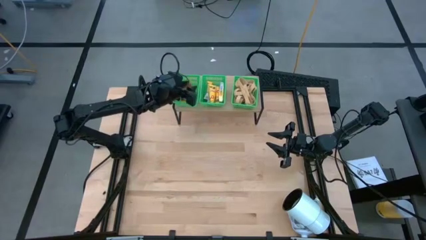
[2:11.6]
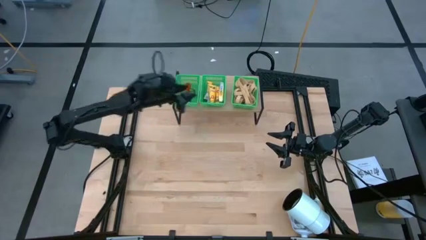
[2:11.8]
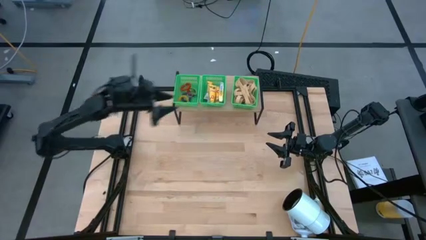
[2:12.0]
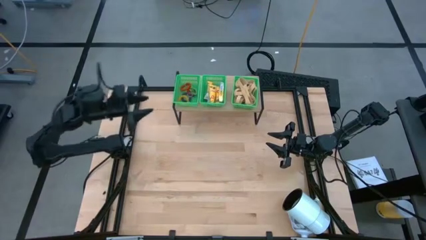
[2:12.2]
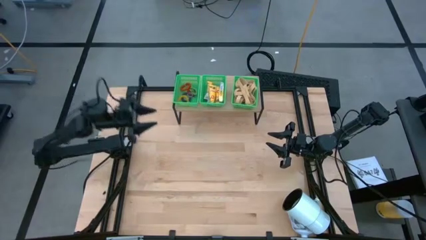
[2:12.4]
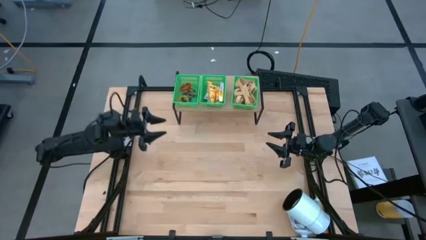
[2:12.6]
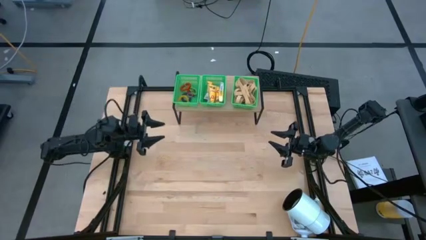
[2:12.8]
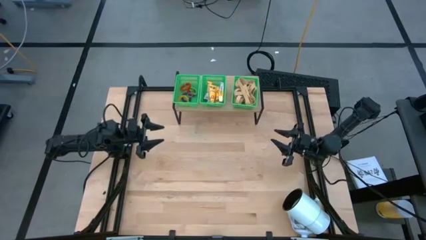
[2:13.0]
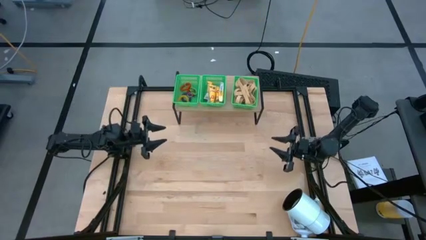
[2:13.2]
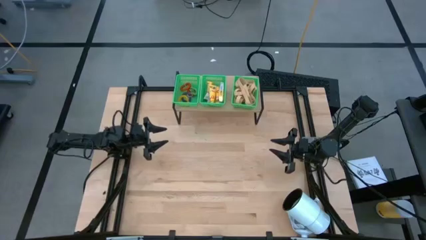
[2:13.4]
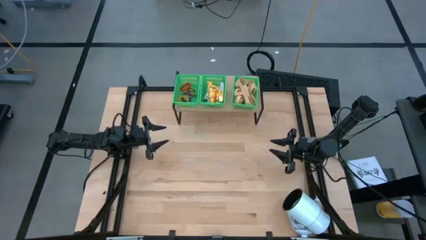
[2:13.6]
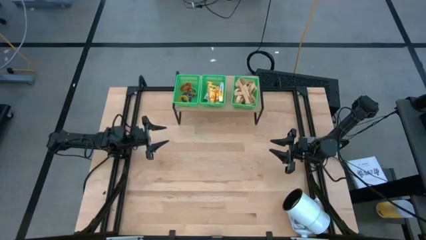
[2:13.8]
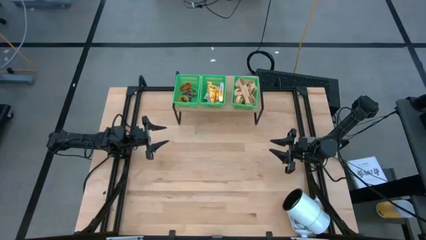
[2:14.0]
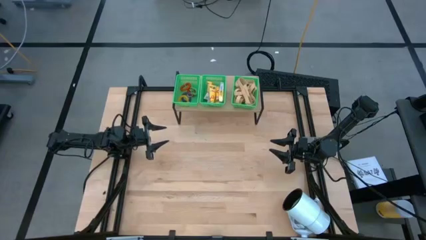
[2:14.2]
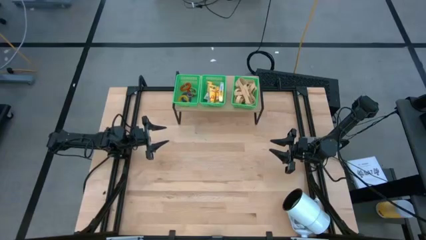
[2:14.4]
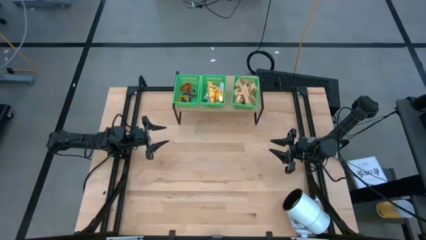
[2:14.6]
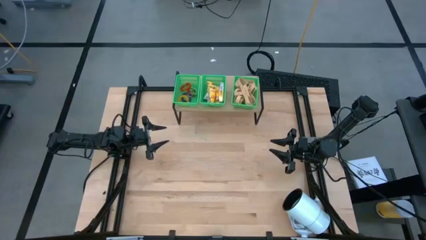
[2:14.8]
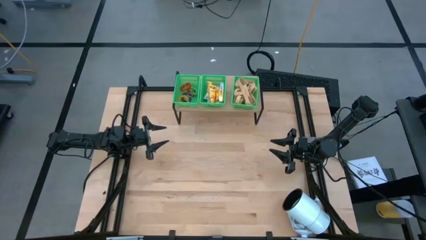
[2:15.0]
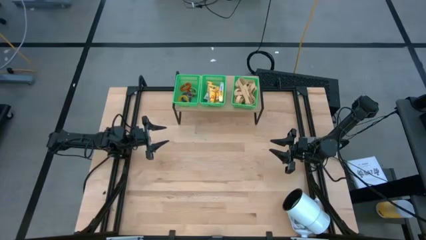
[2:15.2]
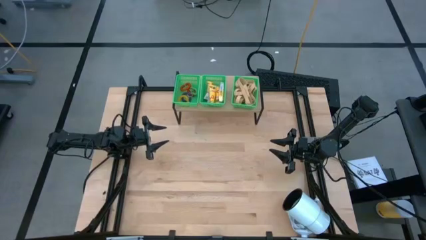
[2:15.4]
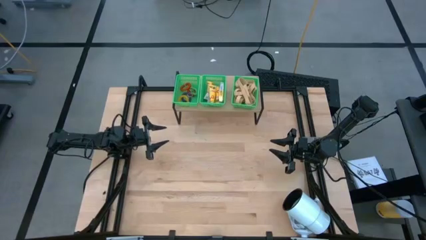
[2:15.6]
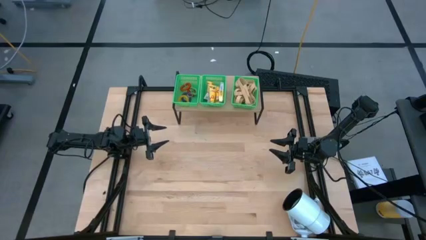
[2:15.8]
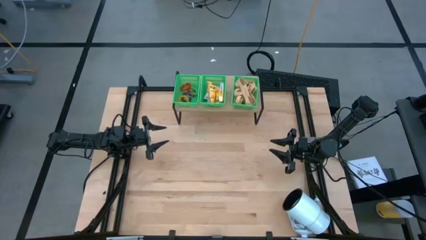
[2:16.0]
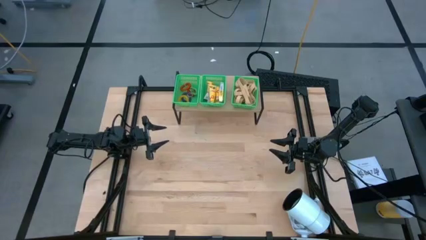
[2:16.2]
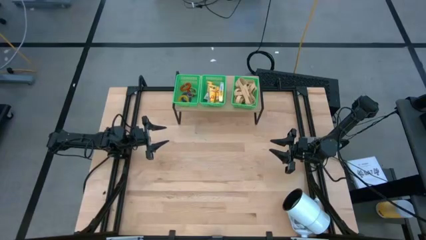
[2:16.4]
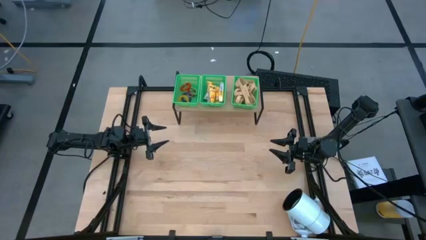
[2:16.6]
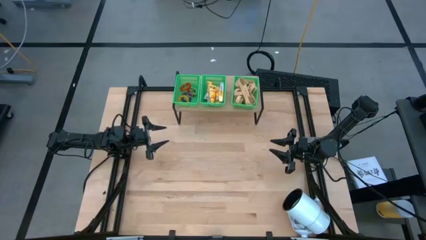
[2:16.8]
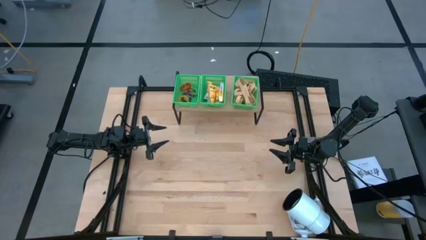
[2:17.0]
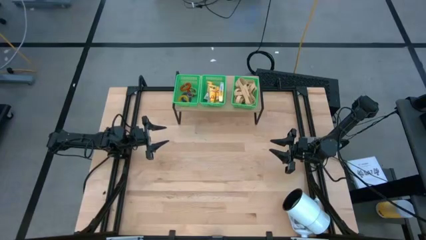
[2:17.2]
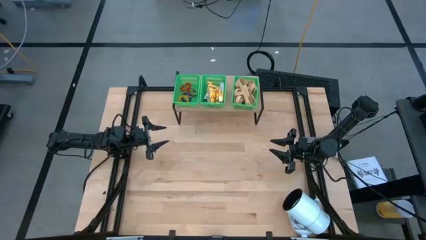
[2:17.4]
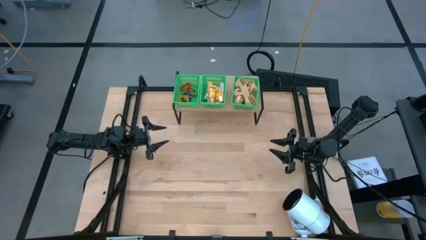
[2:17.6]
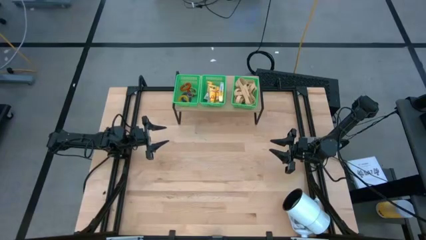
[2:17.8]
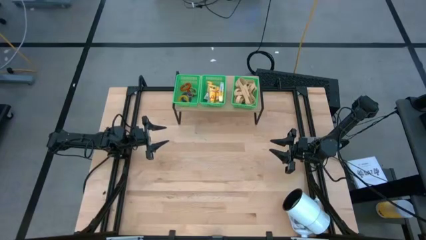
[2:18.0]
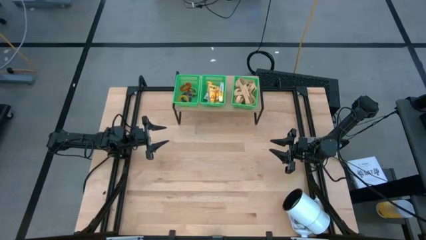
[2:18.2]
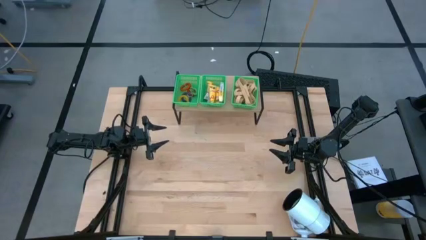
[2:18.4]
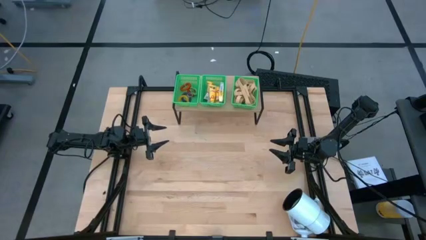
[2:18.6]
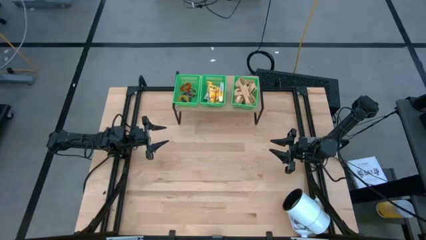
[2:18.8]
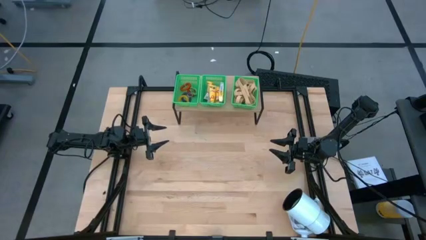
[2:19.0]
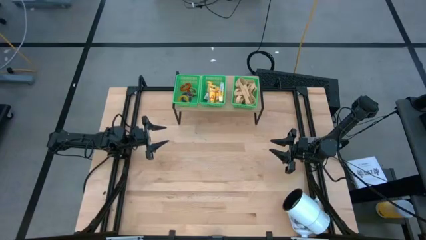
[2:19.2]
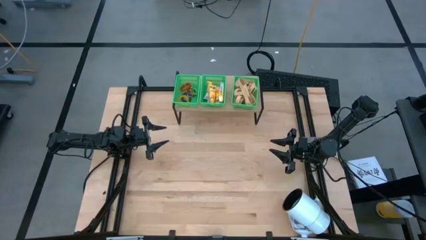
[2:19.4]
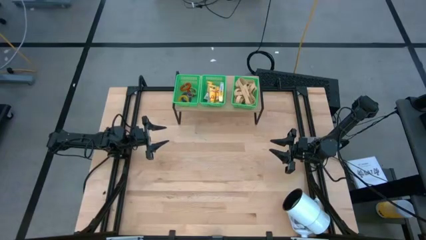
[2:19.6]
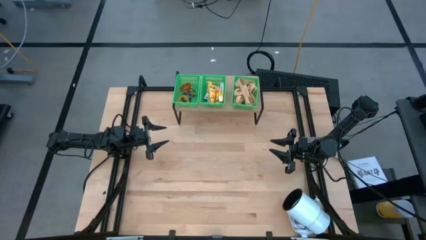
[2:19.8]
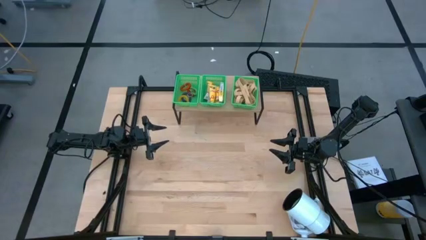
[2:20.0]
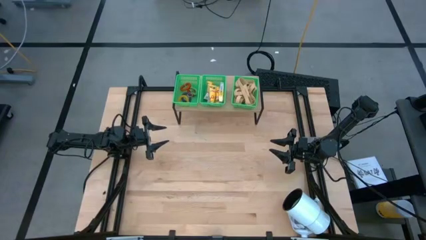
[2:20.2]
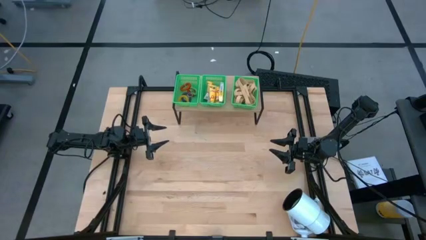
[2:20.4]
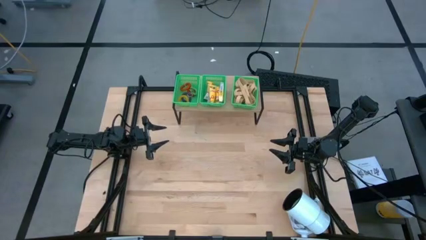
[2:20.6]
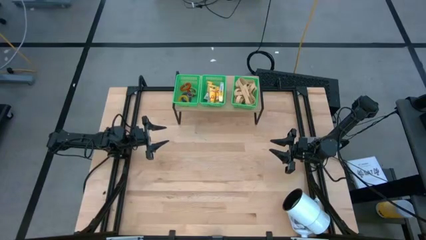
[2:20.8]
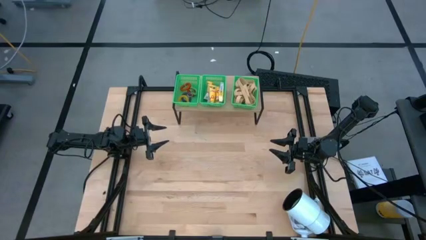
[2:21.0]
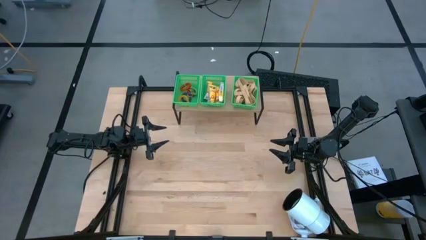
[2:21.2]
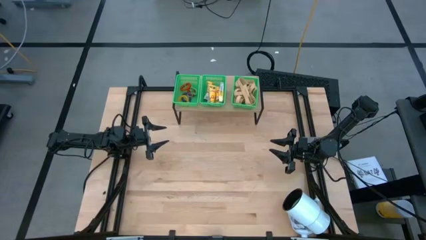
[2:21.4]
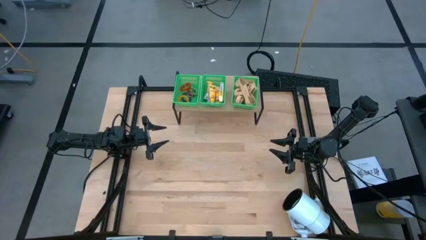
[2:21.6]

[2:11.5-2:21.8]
Task: Pick & Place Office Desk Supplies
Return to Home Position

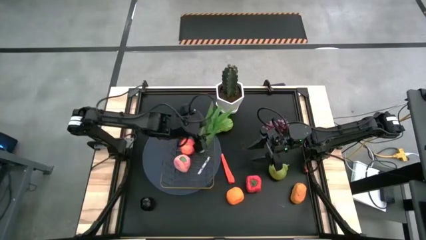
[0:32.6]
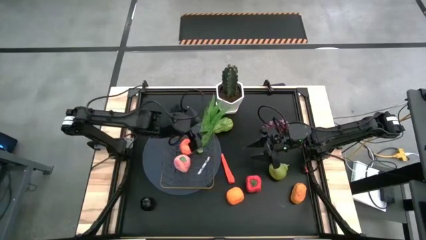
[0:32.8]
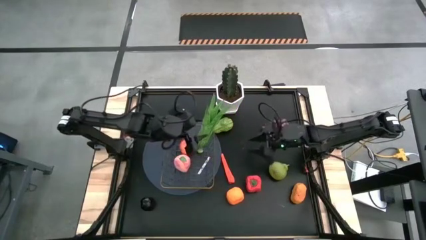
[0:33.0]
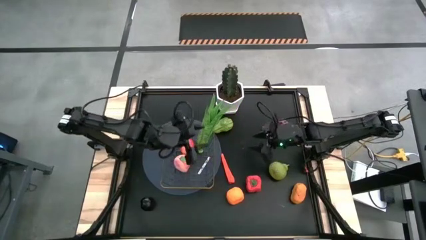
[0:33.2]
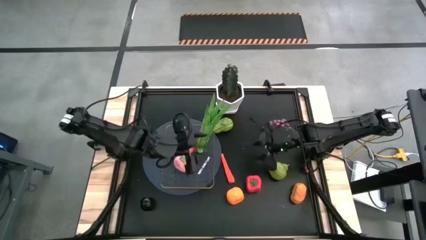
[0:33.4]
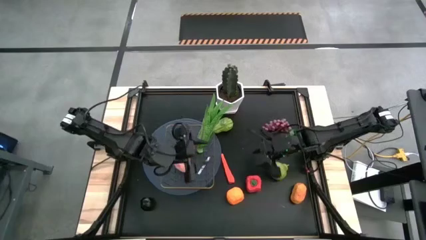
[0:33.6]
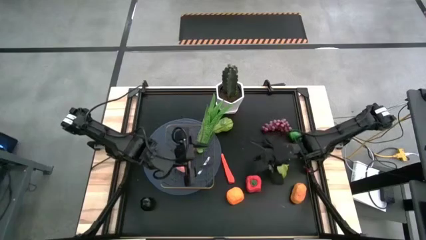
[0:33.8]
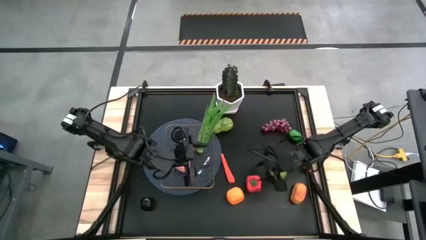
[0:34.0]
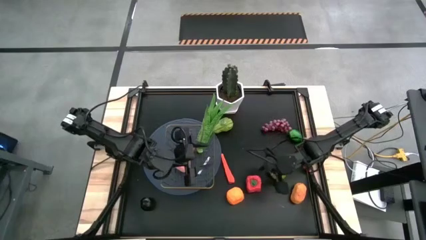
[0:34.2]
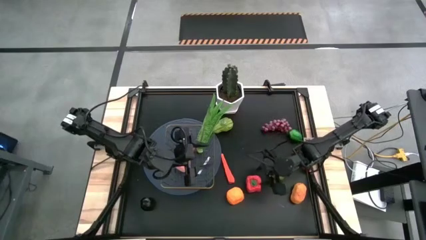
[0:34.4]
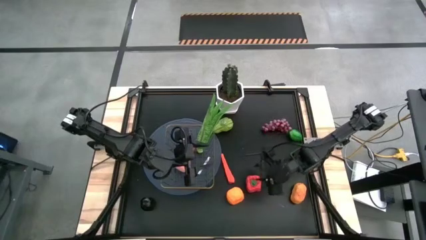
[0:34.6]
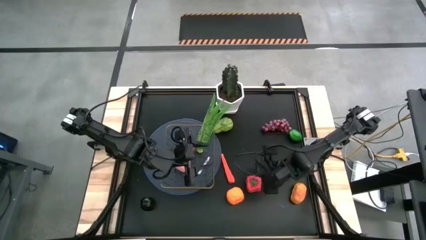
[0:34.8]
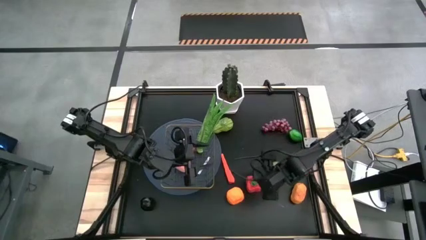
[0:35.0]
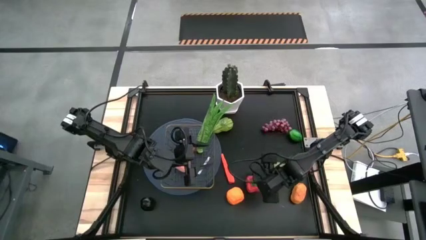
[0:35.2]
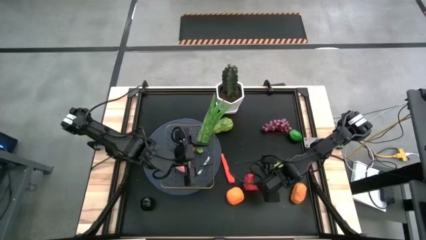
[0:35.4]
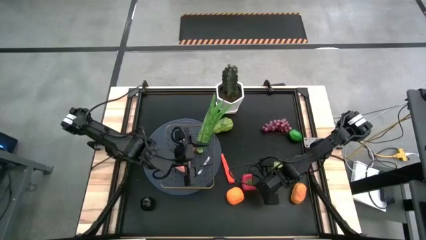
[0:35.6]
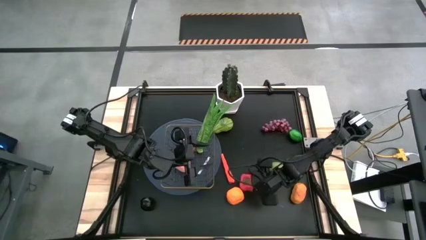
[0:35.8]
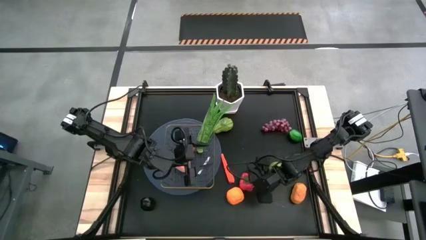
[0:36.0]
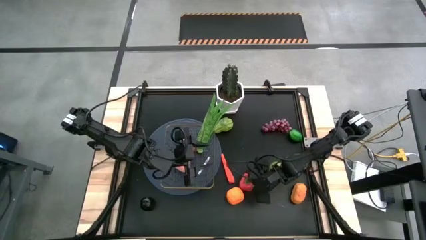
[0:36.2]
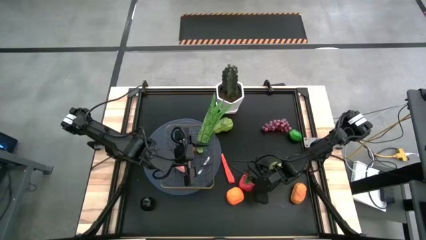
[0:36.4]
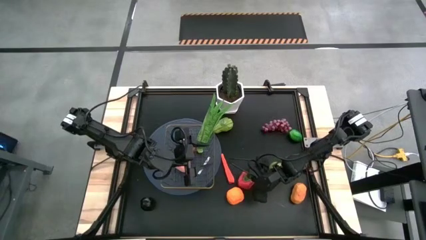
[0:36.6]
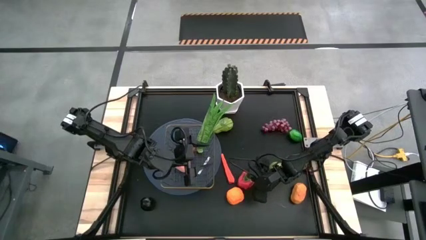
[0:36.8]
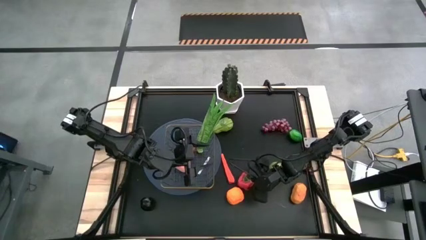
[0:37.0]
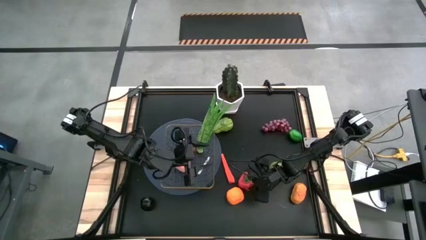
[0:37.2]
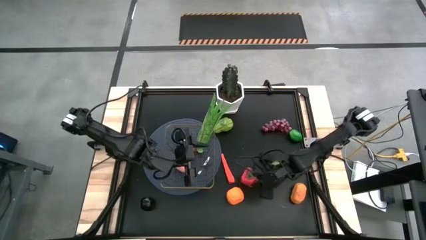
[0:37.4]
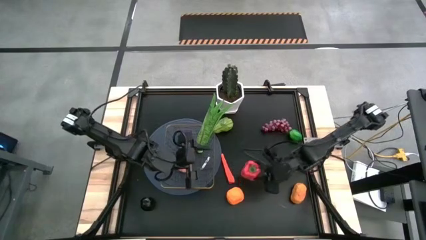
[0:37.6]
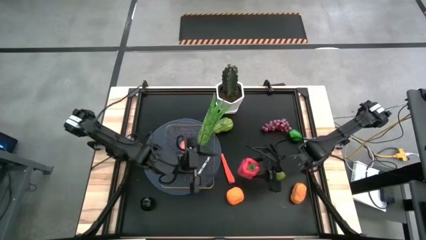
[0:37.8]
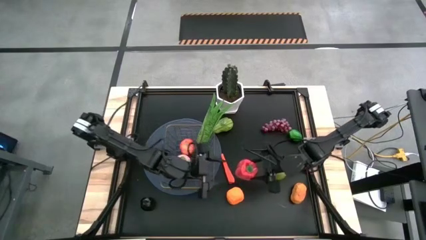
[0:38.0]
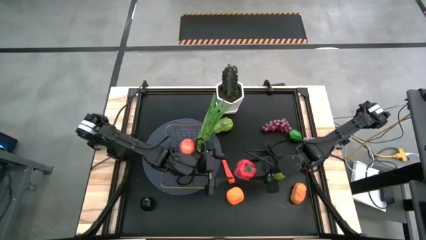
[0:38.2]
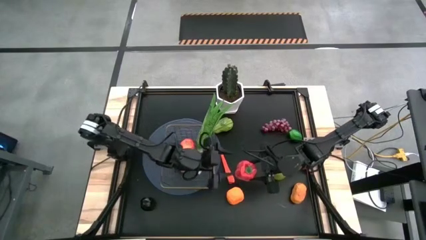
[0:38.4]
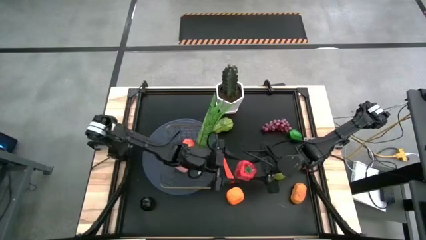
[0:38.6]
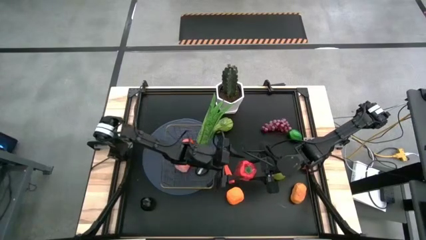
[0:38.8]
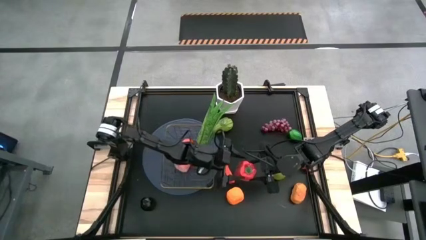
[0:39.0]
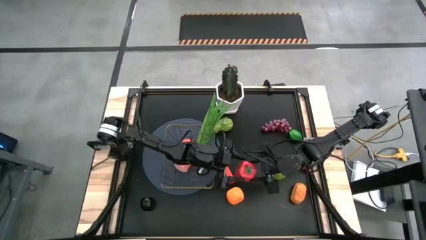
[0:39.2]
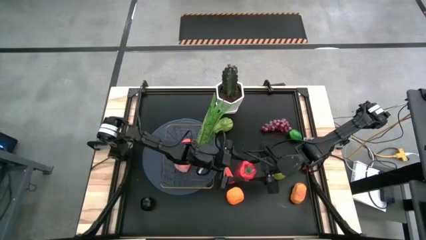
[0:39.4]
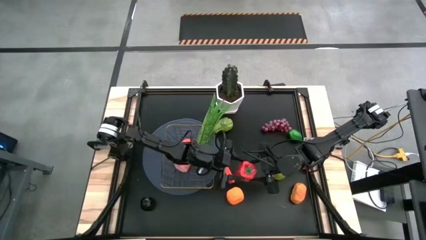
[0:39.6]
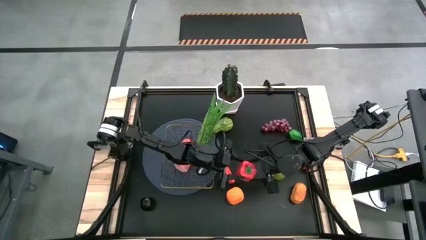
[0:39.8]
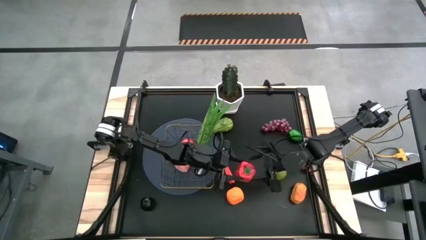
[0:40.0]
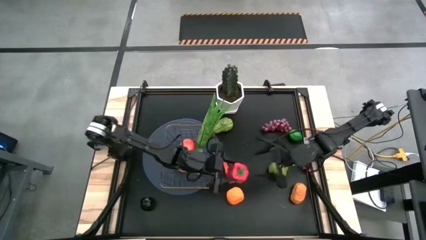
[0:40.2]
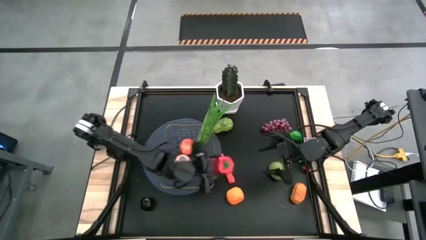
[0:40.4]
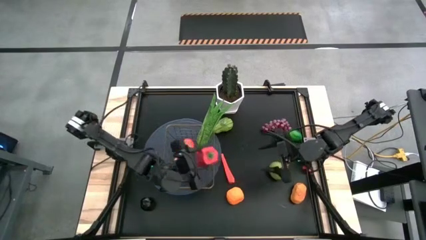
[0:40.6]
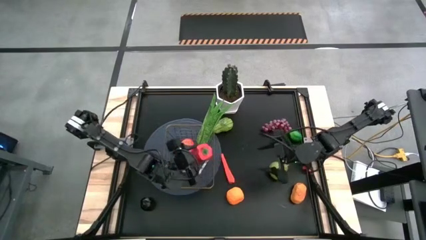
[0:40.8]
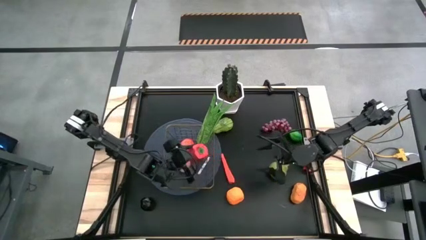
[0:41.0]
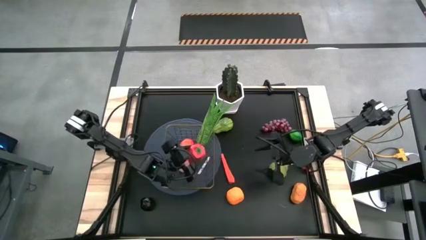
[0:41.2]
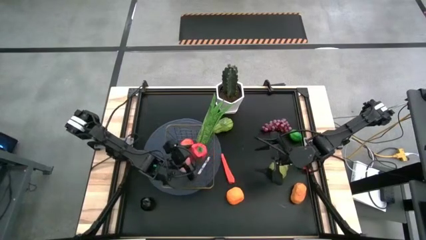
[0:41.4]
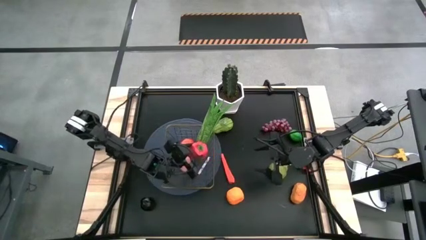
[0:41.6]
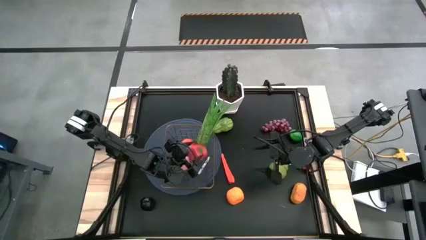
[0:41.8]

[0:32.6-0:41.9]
Task: Build produce basket
Put the red bell pepper into the wire basket
